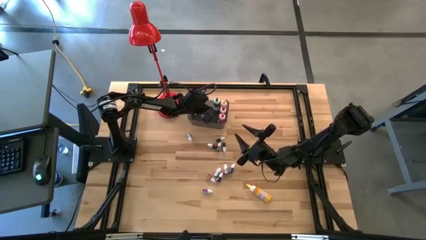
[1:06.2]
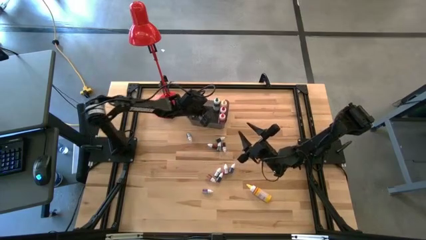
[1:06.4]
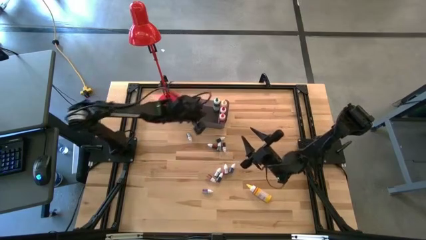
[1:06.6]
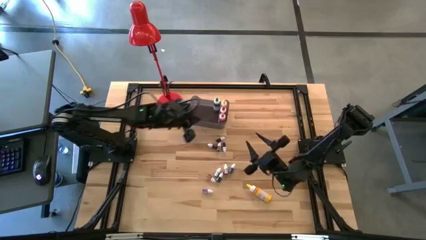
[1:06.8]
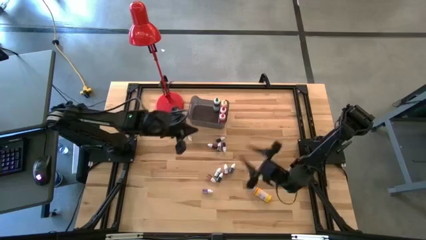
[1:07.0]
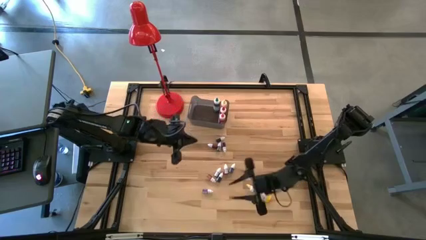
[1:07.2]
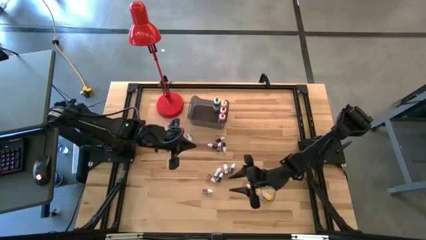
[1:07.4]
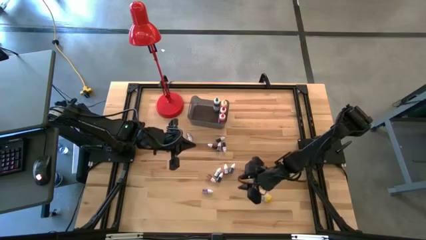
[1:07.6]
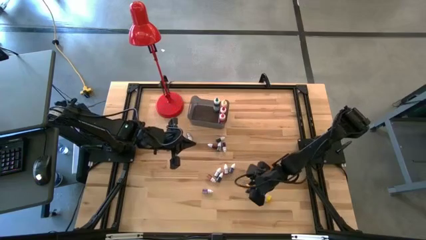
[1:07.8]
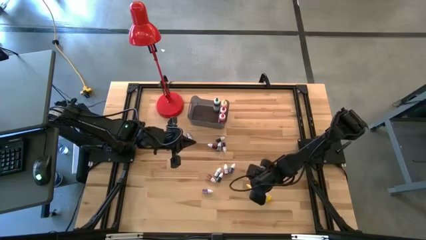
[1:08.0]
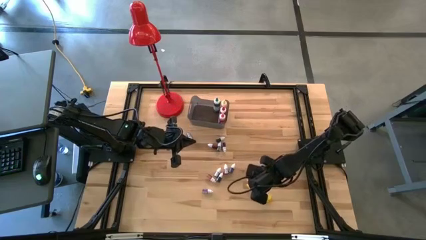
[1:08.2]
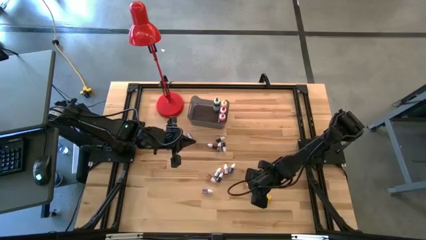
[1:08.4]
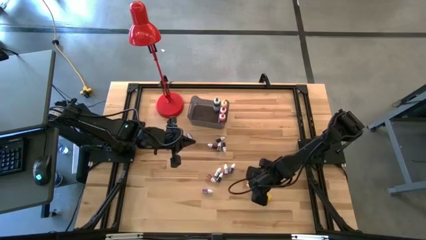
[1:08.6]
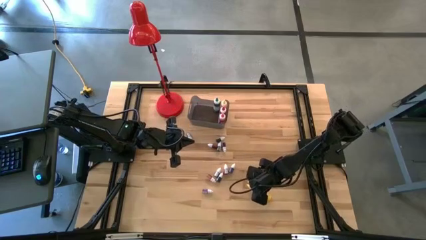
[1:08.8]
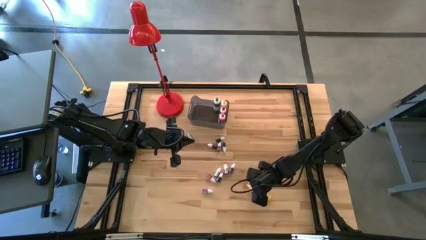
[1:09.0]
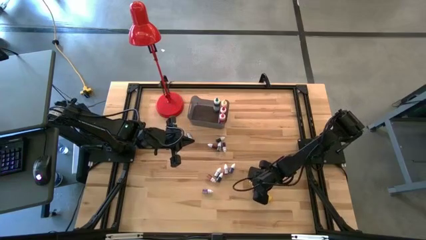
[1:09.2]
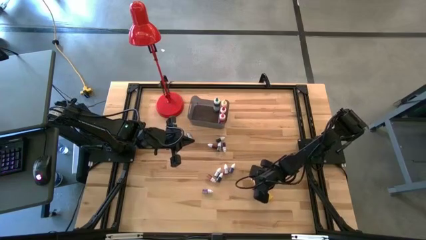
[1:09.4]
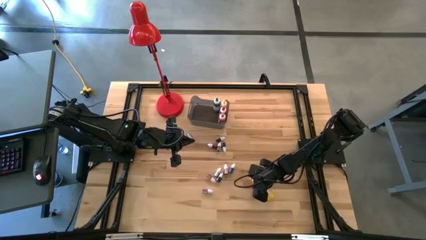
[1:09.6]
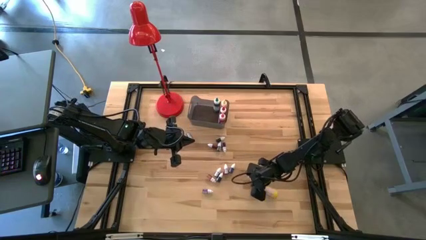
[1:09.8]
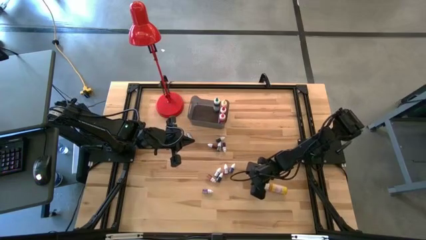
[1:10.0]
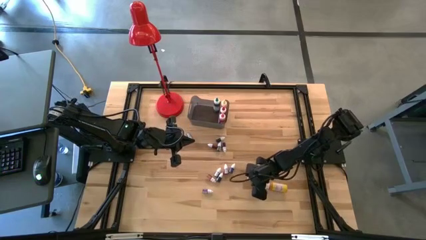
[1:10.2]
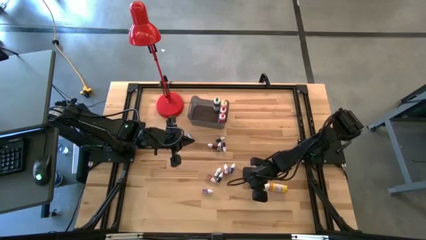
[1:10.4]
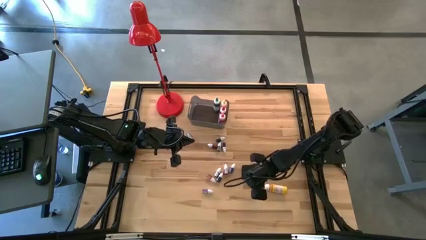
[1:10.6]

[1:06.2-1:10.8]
Task: Pick & Place food coloring
Put the large yellow food coloring bottle into the bin

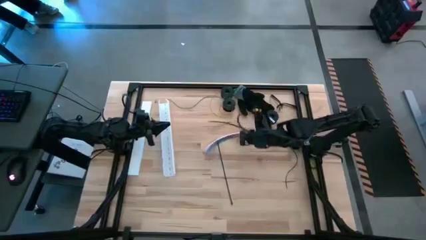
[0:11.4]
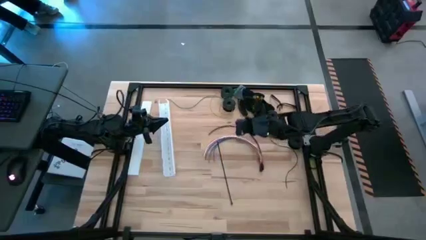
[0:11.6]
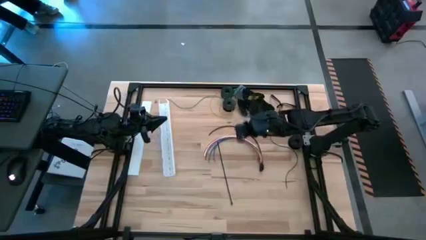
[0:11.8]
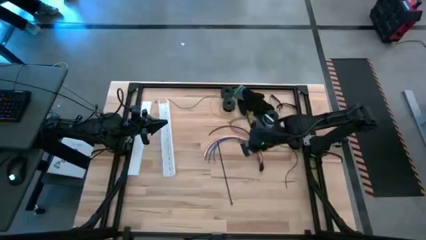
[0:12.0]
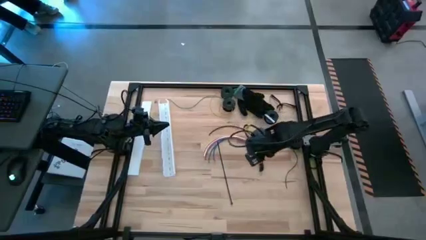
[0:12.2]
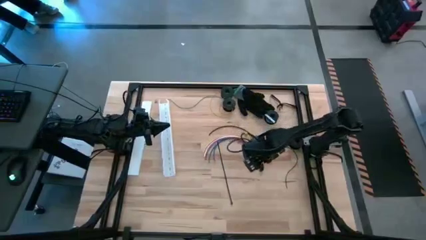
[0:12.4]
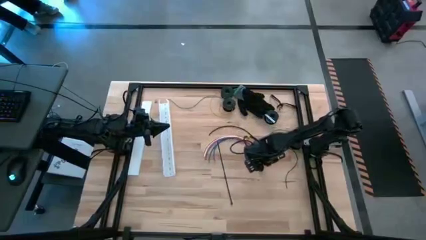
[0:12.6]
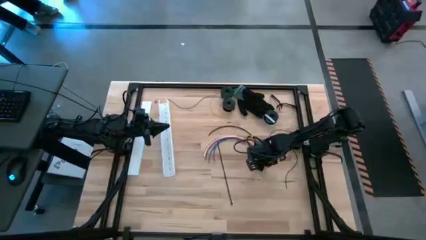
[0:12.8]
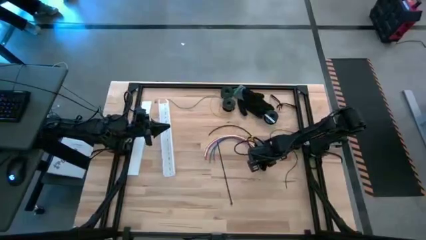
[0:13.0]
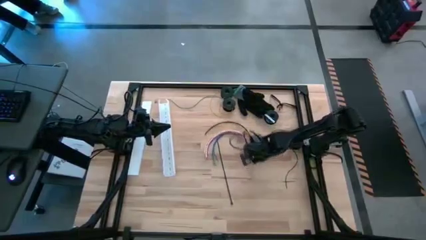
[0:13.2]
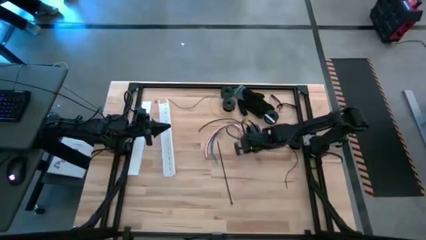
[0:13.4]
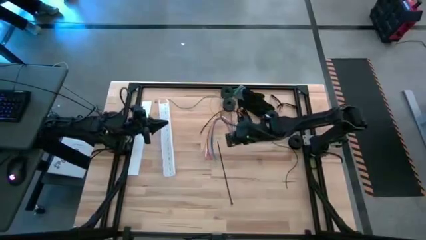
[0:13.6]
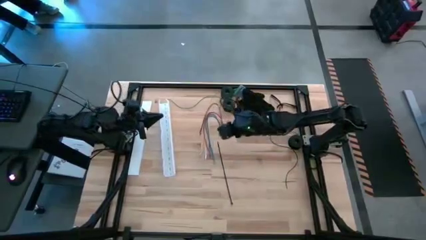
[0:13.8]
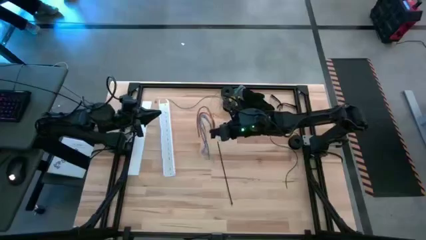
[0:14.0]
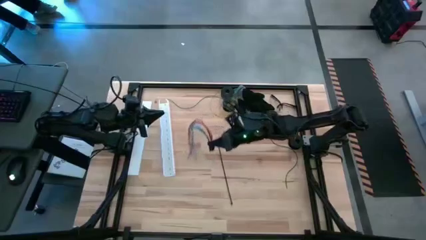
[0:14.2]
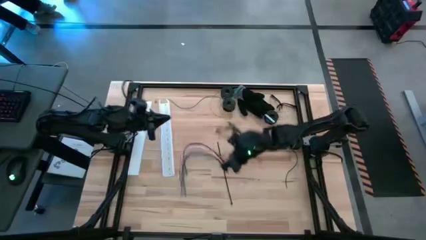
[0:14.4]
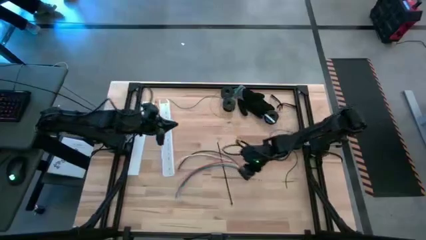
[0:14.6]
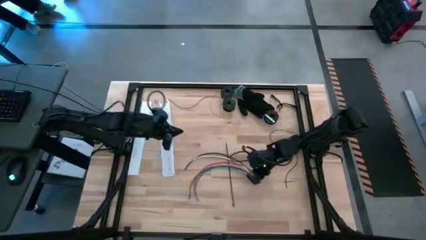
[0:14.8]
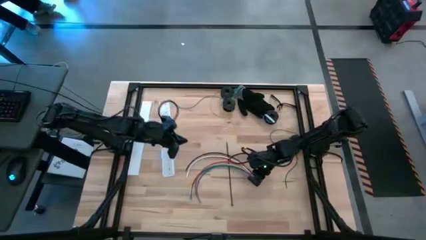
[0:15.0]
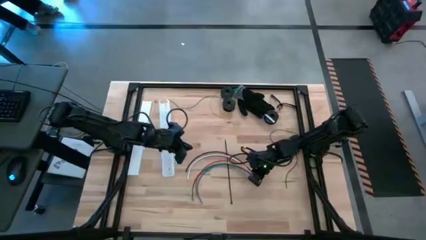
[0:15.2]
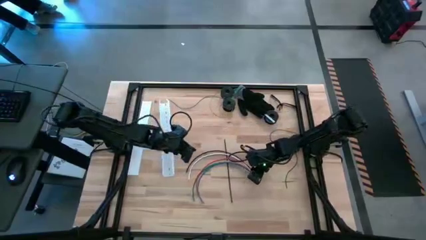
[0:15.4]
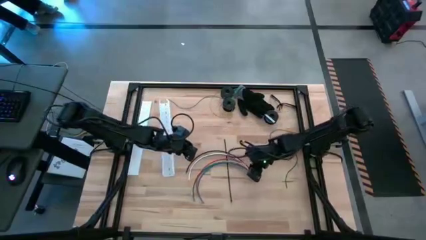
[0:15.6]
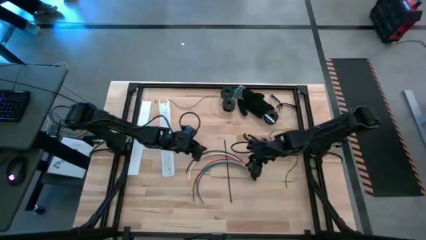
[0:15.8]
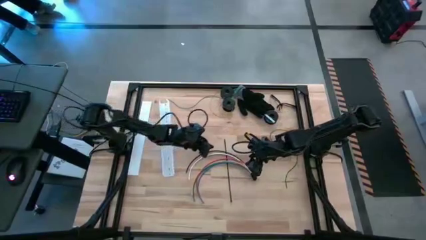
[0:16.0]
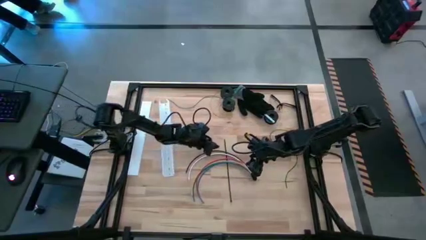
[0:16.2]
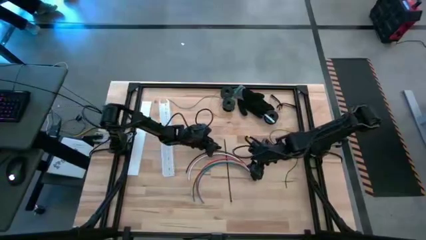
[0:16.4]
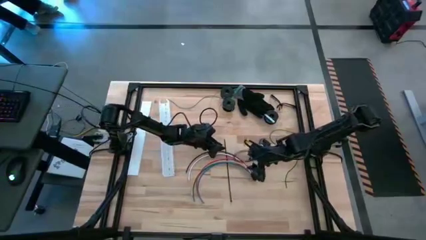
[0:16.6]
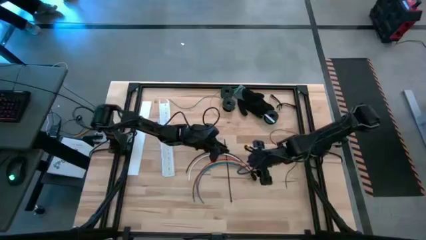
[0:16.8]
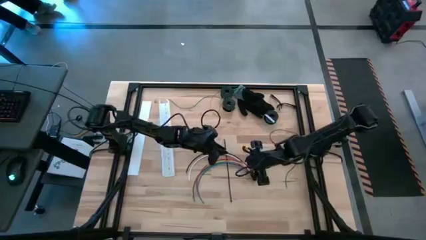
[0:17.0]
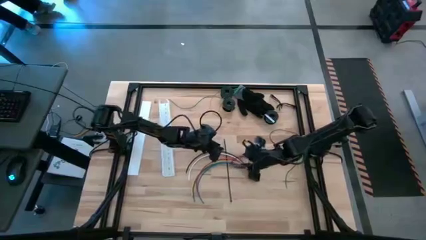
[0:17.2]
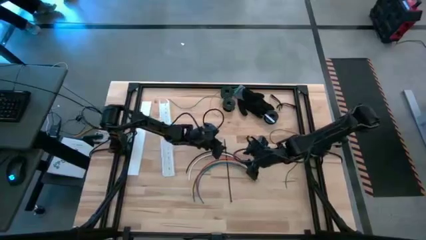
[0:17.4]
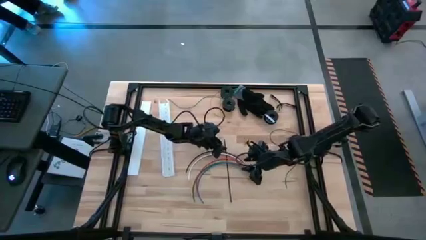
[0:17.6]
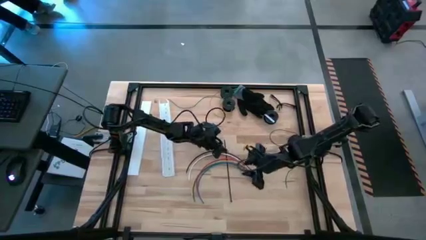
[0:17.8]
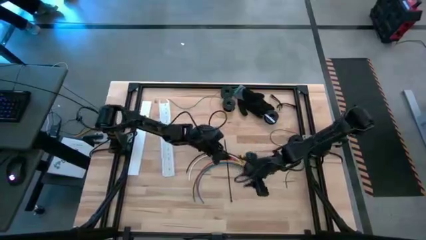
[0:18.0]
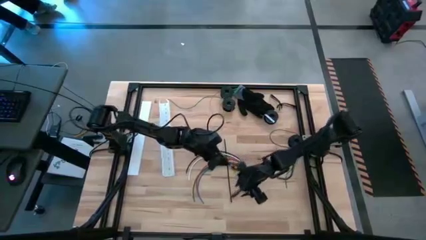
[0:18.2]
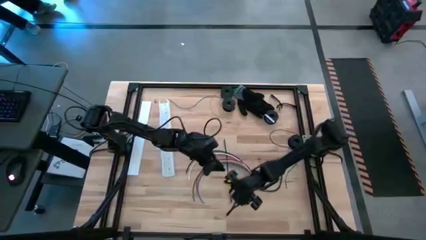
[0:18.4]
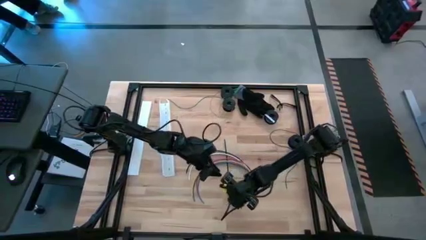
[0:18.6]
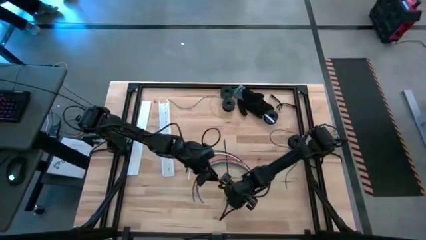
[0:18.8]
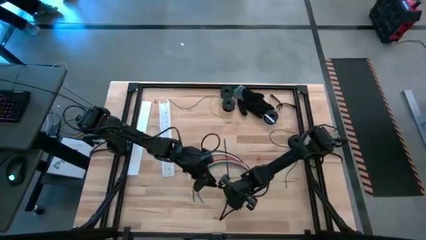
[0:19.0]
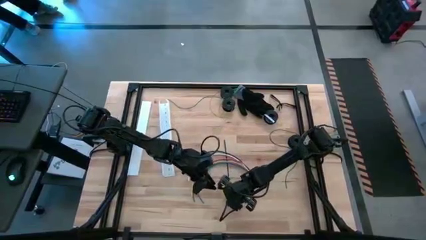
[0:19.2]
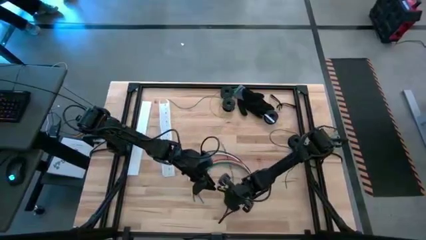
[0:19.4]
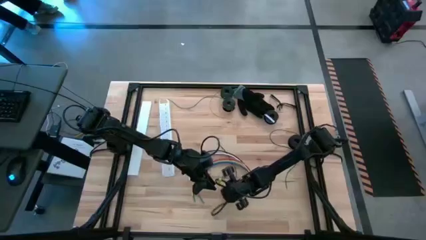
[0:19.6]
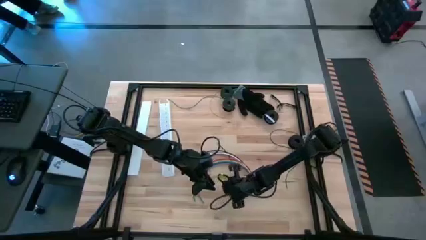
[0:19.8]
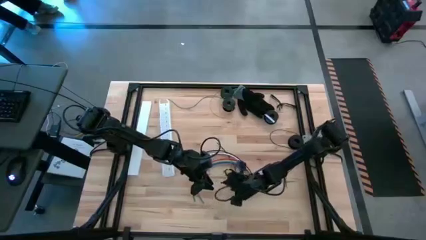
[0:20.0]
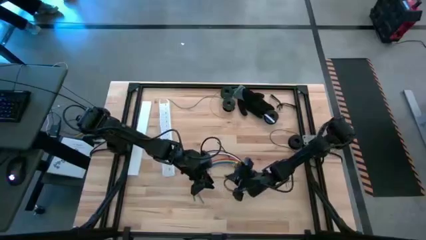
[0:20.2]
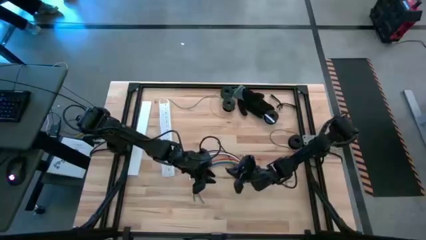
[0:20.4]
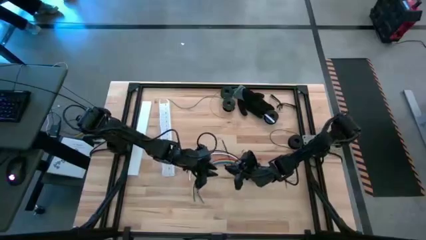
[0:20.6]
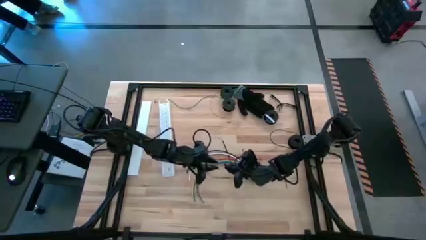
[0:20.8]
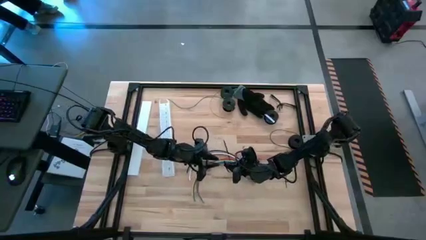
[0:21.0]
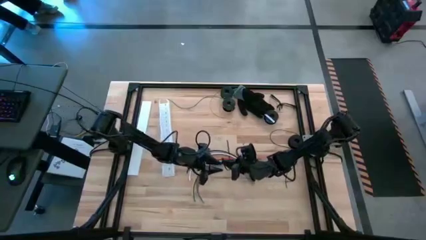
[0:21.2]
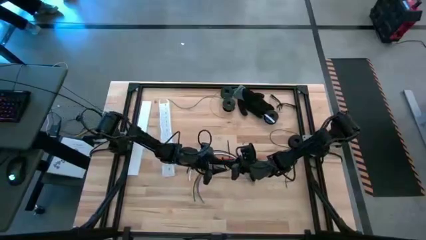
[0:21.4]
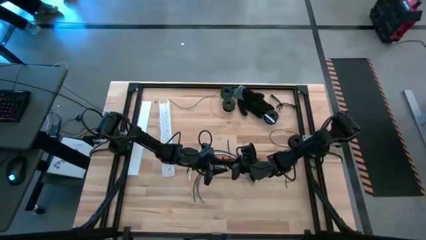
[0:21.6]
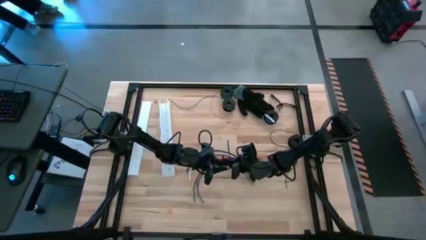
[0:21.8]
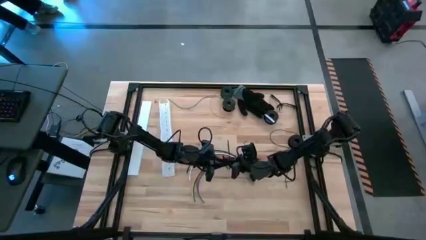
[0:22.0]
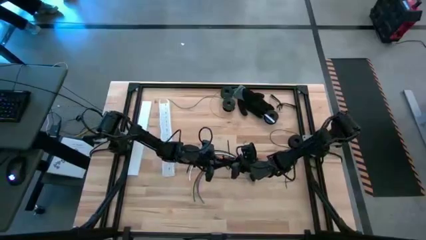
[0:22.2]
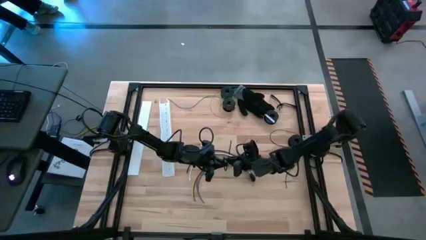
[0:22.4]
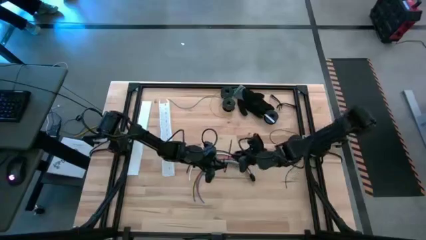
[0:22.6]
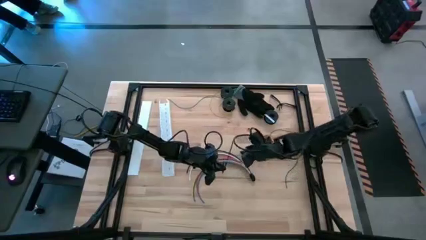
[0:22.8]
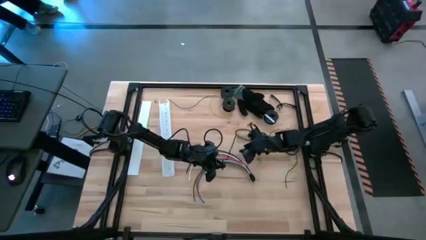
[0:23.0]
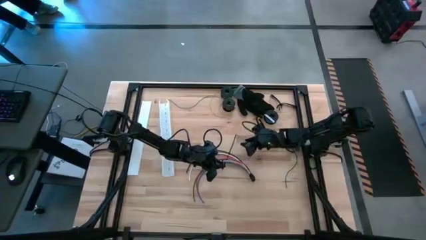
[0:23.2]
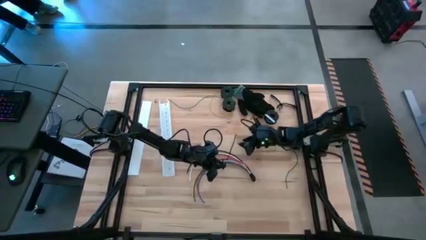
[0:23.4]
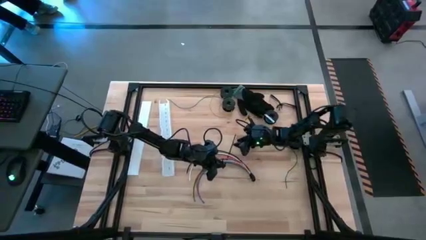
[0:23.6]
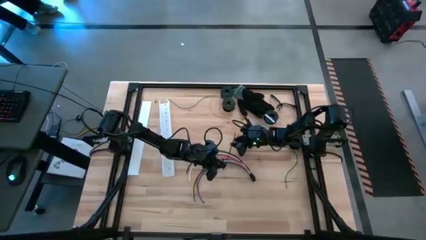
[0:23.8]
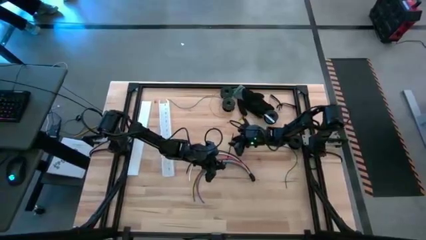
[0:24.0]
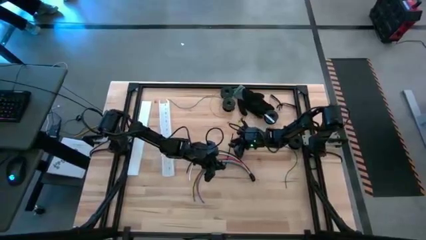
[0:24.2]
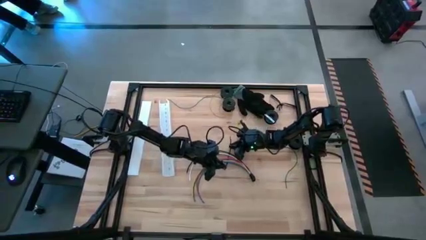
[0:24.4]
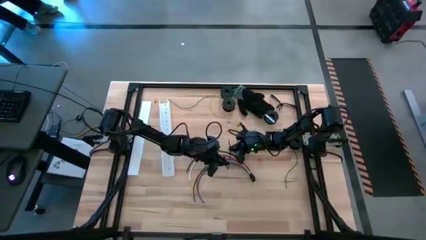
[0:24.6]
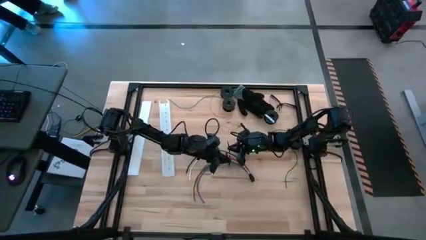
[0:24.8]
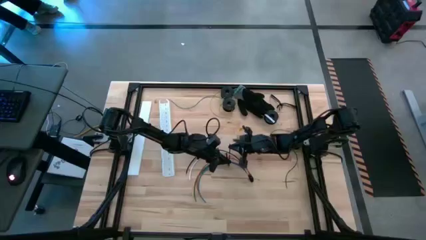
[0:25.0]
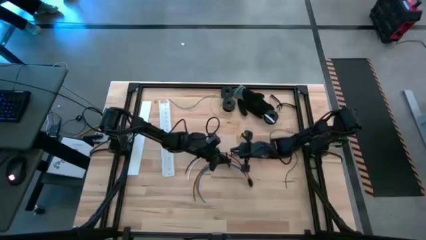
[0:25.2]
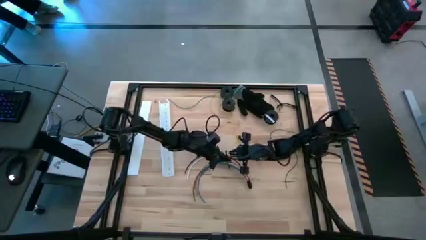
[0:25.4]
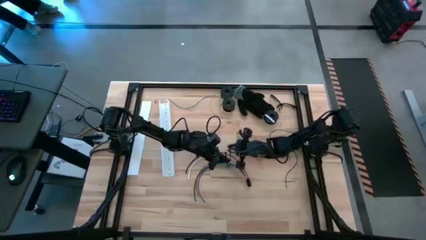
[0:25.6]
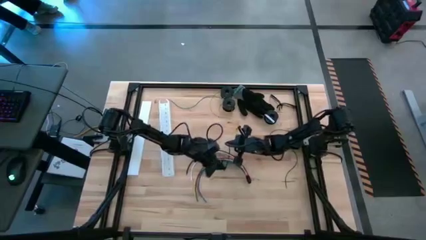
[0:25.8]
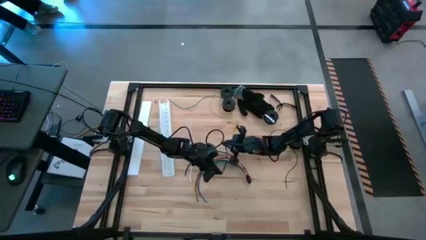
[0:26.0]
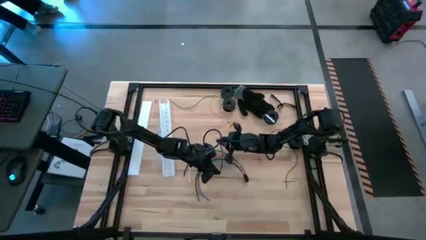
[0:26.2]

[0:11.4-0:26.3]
Task: Ziptie cables
Wrap the cables together using a black zip tie
